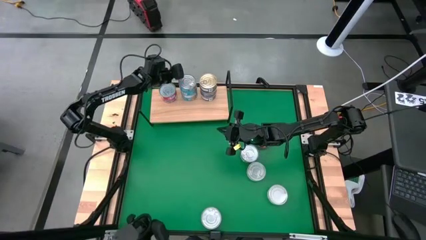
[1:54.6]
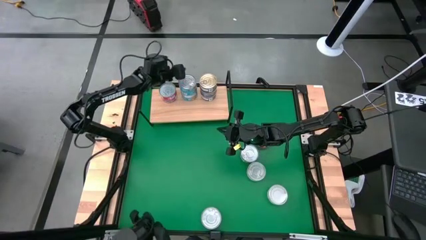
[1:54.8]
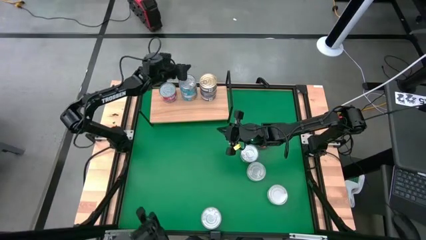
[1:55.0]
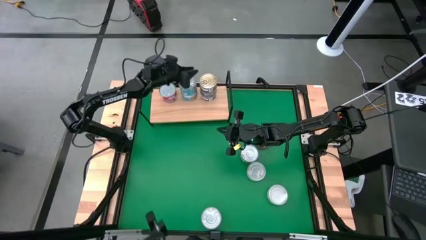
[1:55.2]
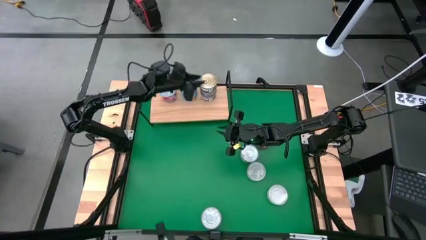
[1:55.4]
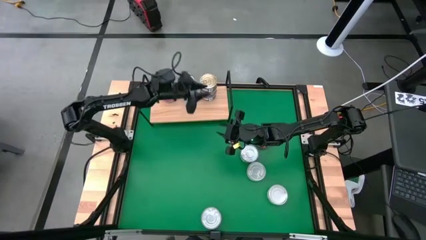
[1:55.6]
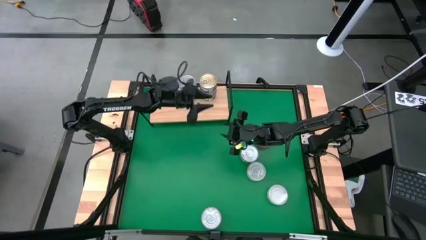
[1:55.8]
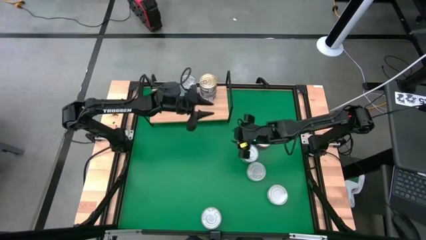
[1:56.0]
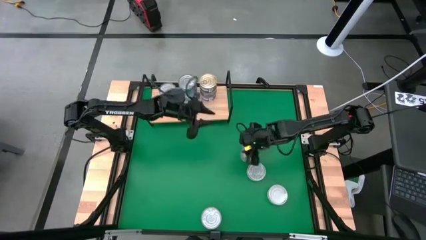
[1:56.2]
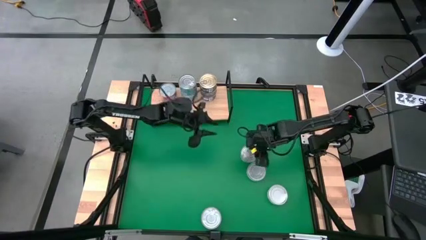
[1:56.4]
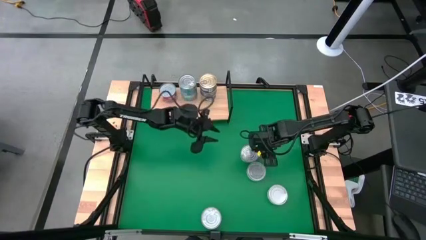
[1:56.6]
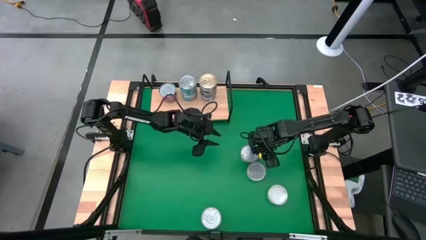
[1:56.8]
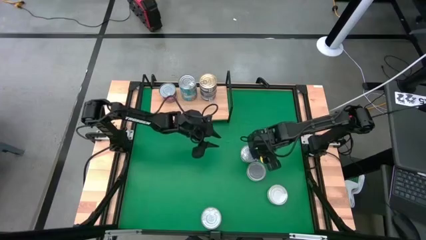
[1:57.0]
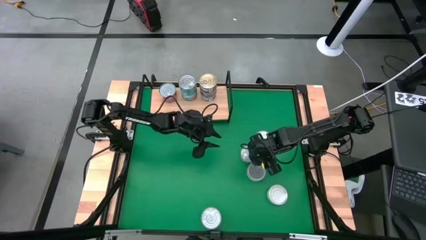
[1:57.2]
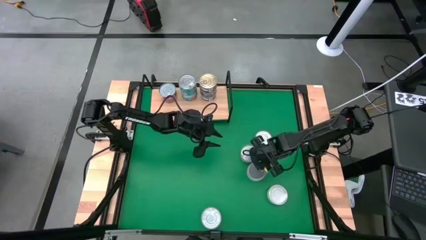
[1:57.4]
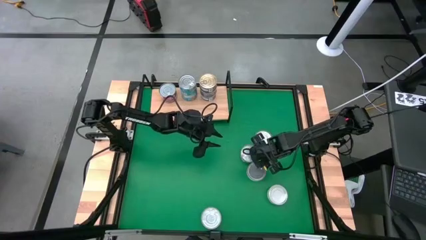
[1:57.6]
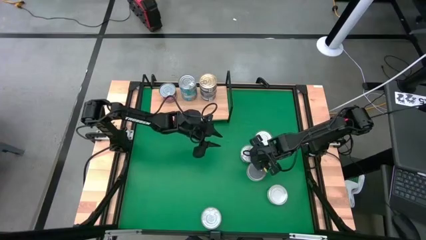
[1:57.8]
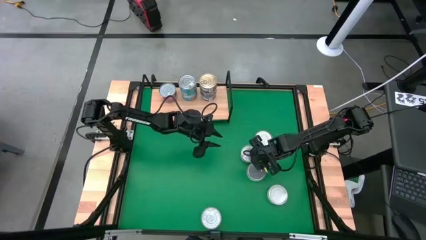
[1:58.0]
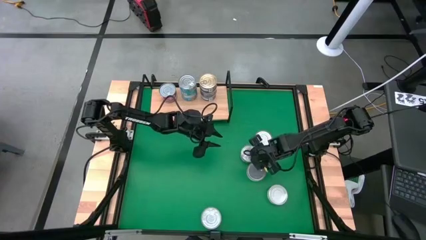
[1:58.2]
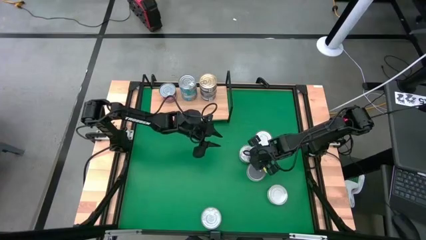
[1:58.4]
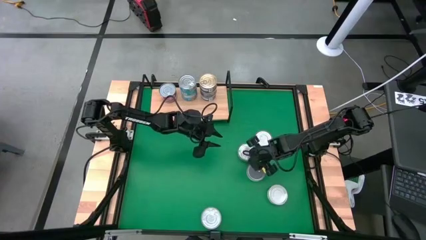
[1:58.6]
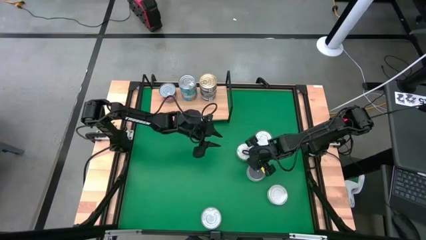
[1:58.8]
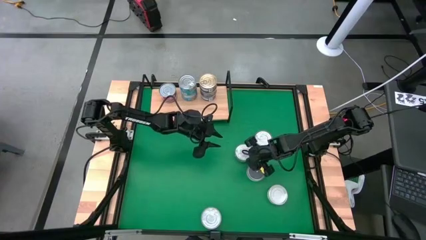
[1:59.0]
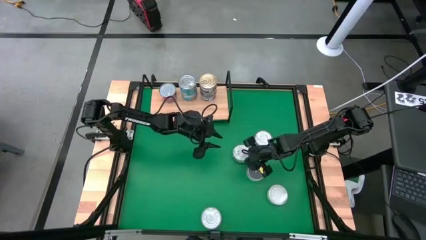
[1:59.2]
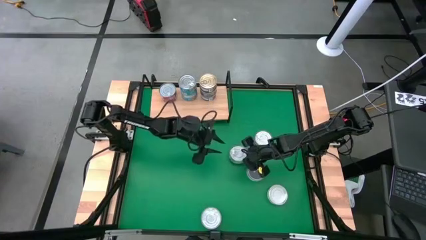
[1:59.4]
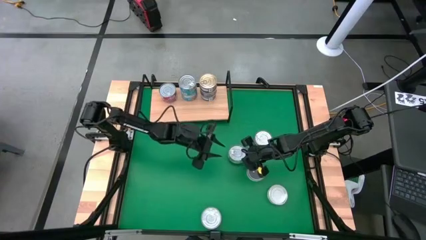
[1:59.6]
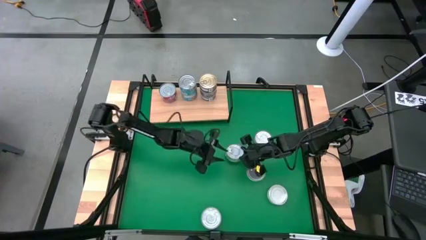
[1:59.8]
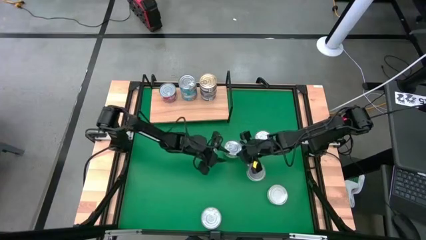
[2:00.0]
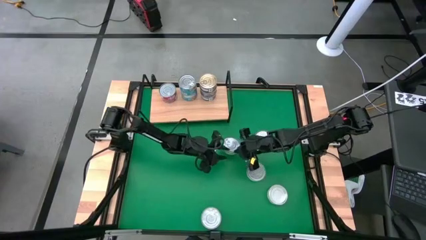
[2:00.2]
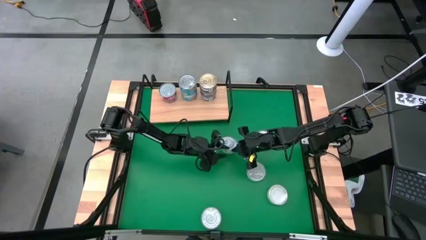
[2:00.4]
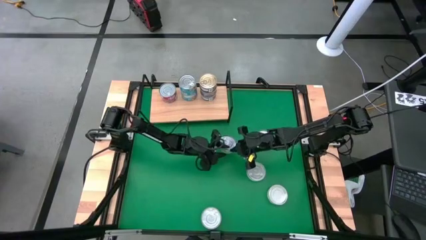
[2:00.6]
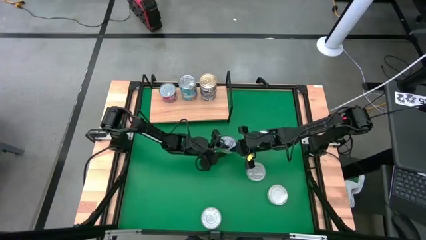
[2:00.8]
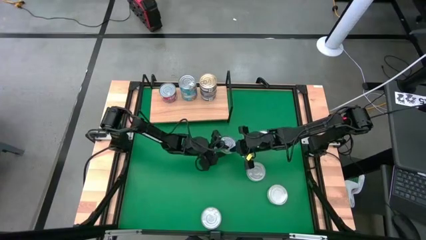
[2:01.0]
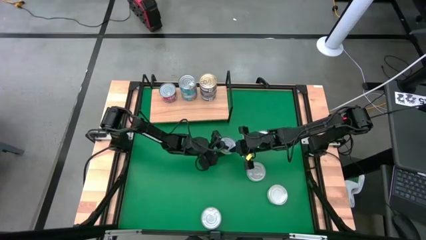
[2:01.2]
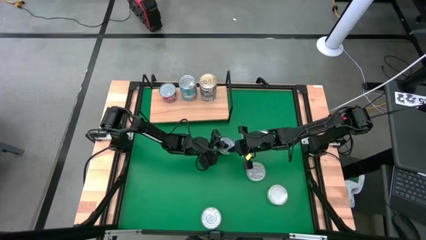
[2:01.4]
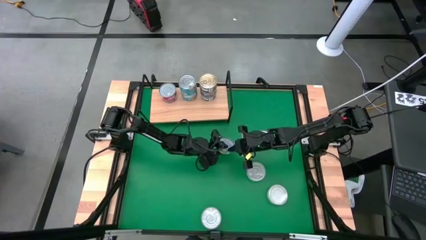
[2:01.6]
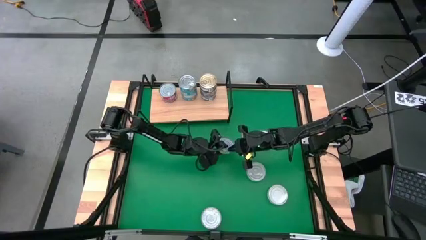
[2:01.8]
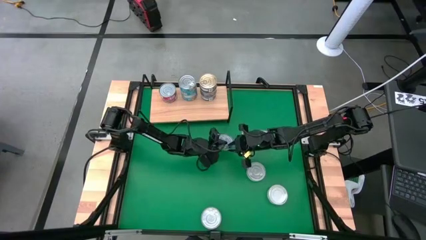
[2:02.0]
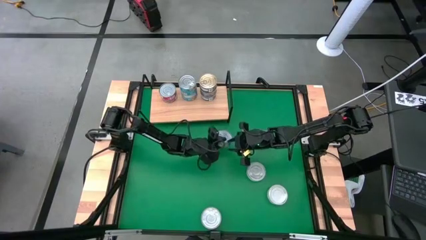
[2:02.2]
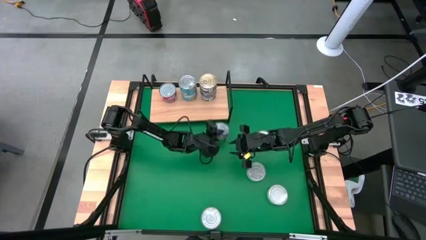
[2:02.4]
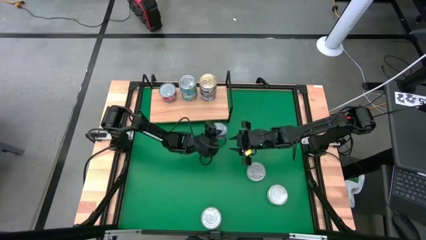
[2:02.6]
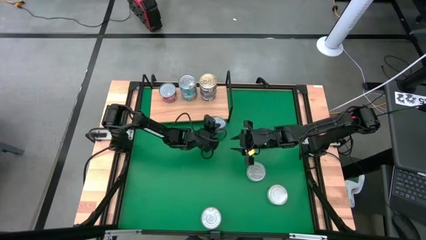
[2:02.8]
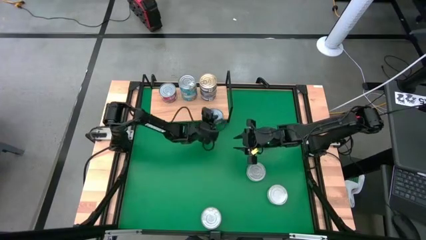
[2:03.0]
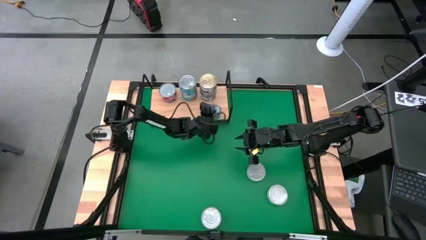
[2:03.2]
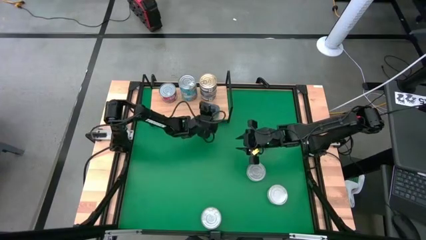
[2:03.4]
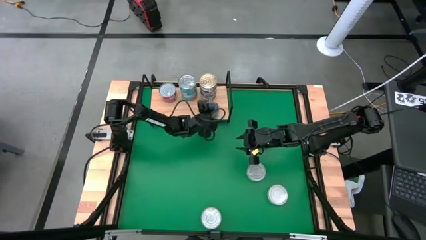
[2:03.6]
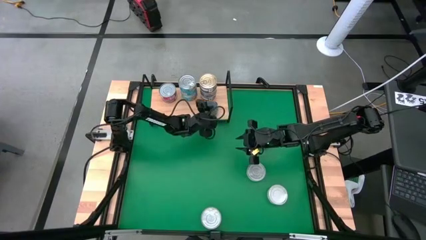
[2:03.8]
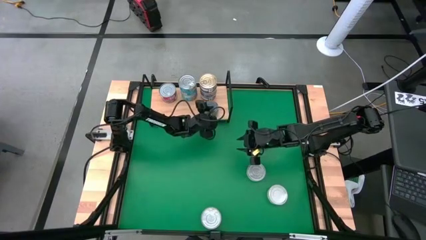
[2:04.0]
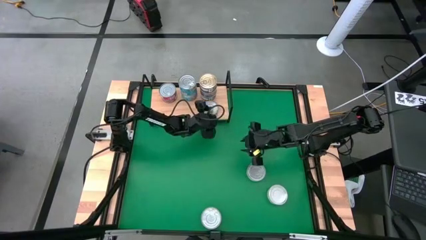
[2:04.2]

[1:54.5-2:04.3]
Task: Stack canned seafood by type on shelf
Put the green tuna can on the shelf

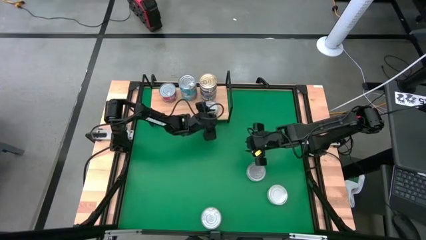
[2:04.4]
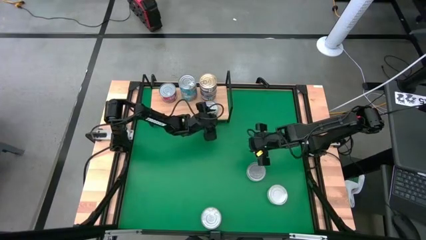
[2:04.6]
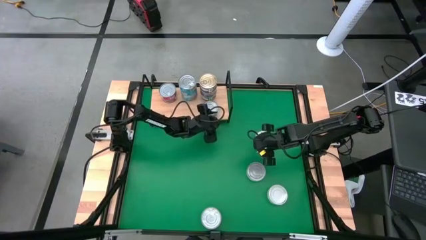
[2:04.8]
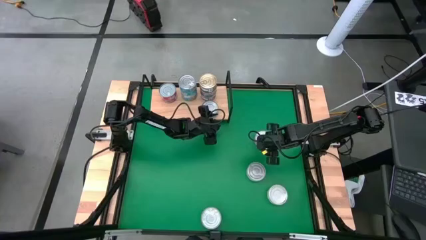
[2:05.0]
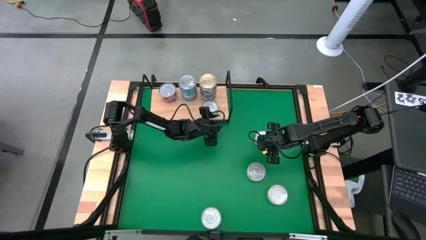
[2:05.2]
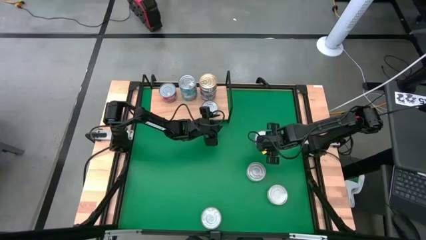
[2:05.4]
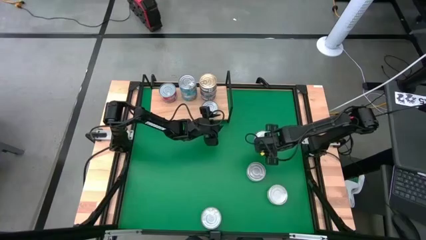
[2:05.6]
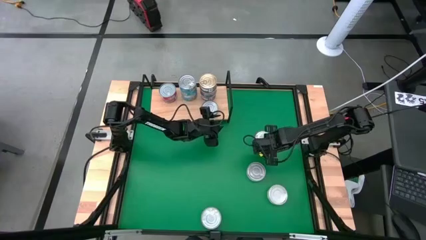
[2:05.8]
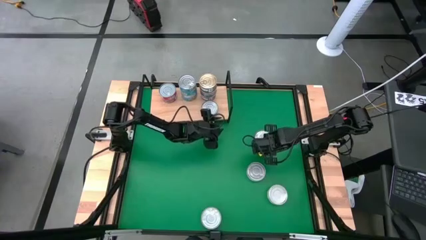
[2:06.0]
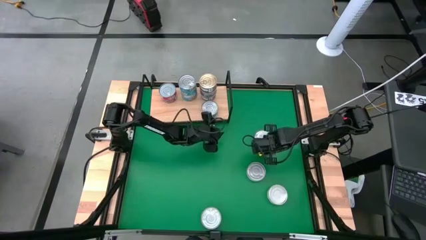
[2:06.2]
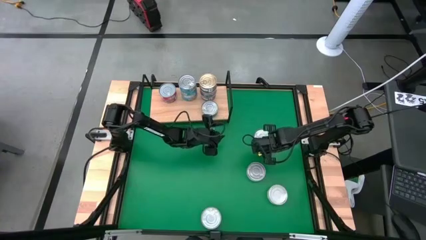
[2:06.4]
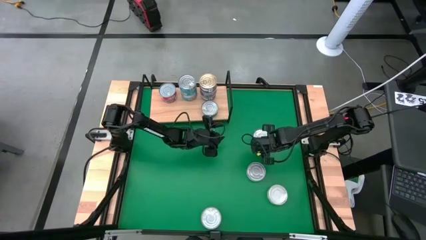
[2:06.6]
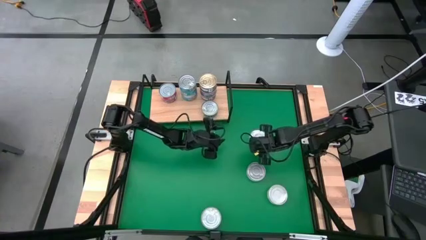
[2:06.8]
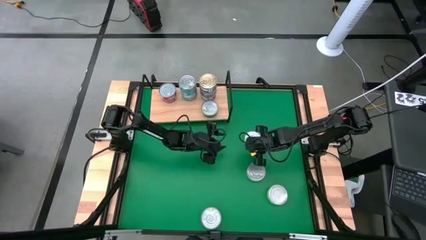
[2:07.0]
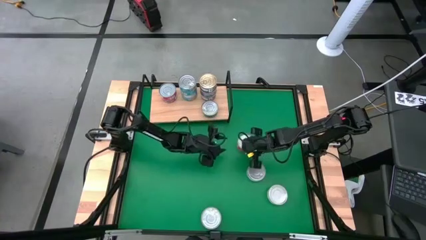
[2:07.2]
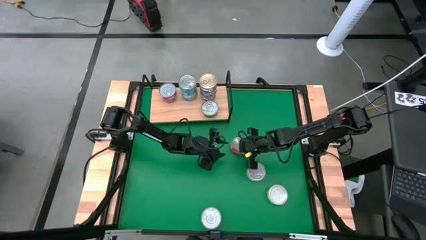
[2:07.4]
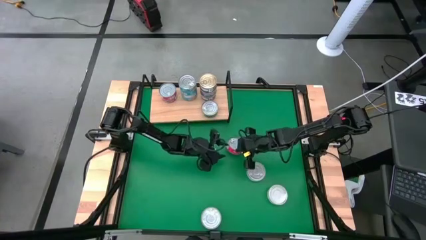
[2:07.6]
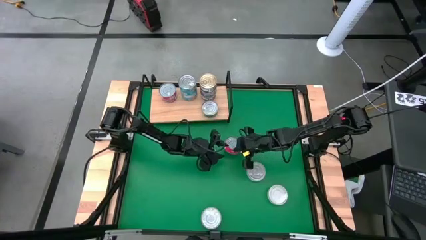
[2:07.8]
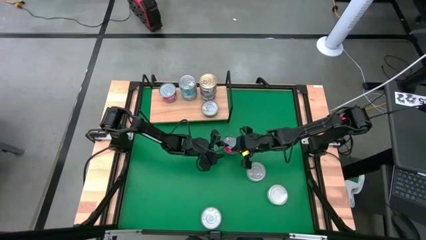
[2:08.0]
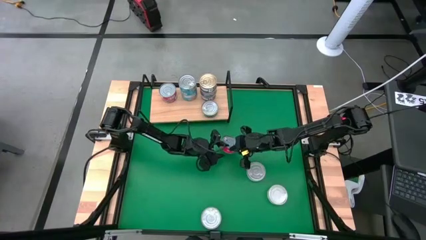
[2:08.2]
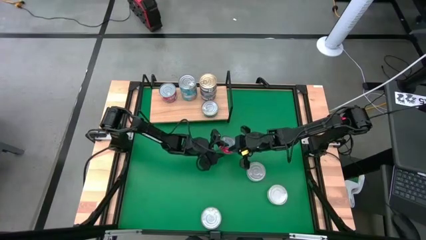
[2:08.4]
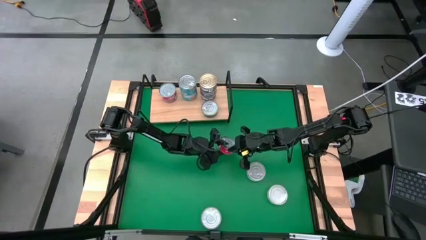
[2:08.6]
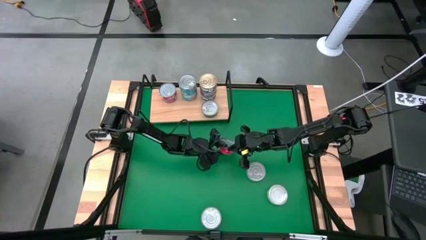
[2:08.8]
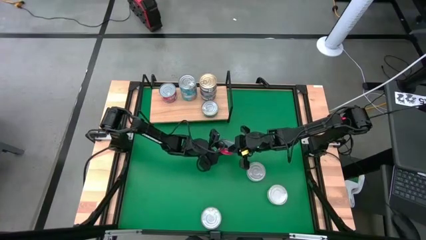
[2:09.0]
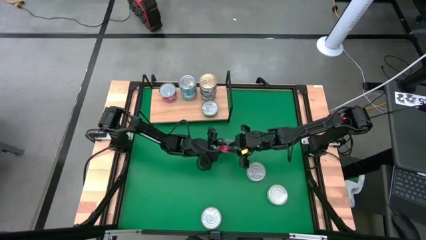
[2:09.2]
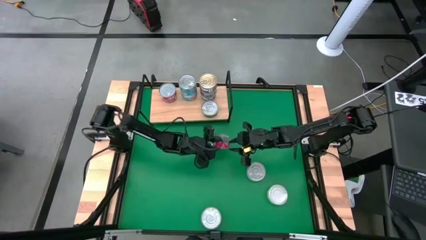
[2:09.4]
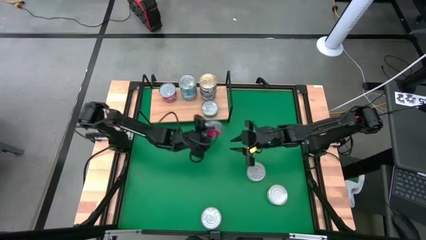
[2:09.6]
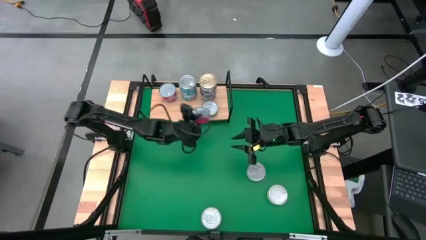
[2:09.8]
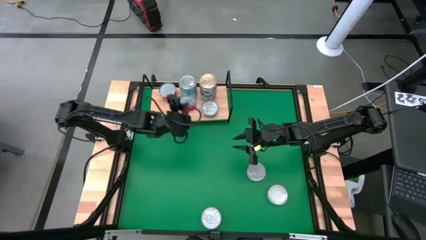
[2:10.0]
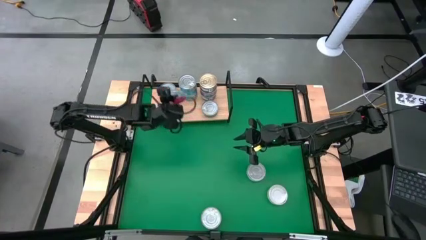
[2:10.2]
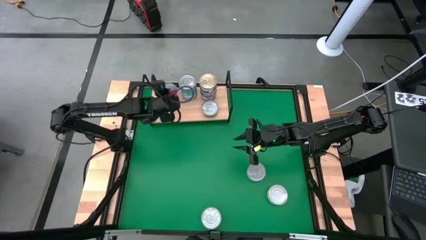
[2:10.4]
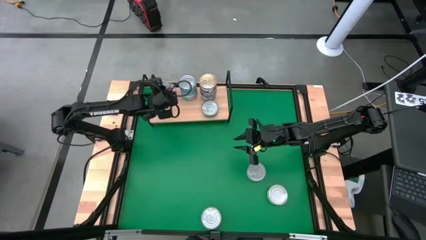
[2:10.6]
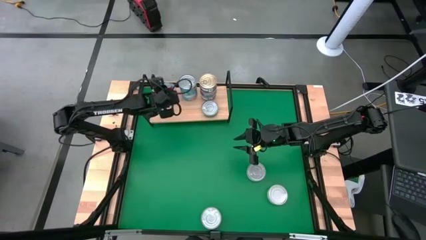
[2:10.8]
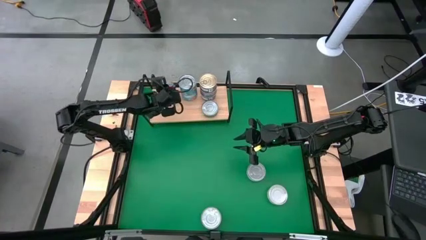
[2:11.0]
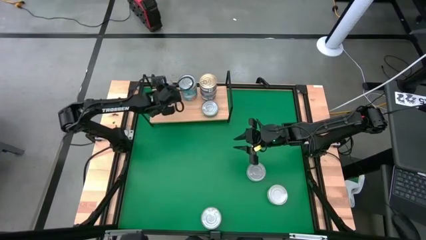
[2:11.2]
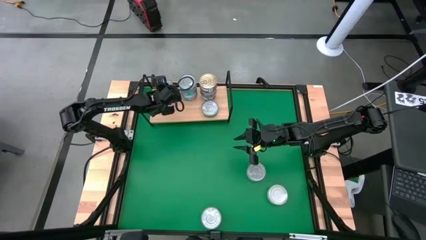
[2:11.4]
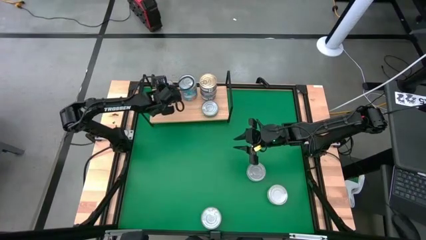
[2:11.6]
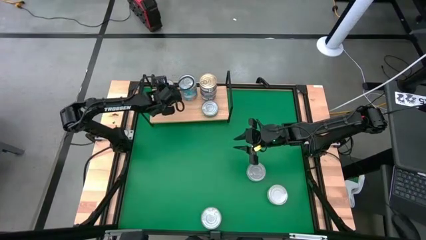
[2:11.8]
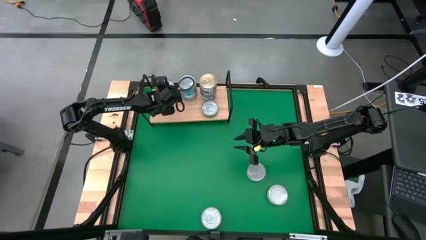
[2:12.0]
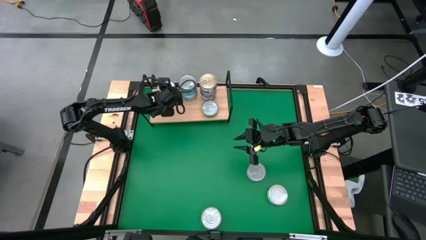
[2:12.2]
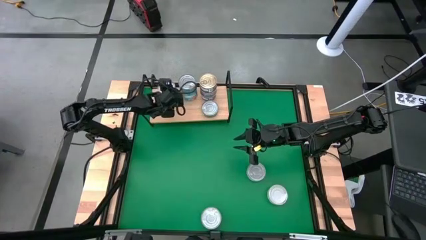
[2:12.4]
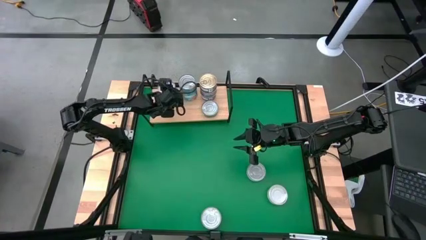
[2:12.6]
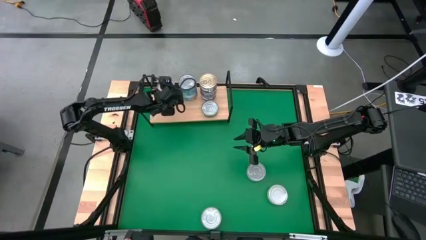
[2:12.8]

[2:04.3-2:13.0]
Stack the red tuna can on top of the other red tuna cans on the shelf
